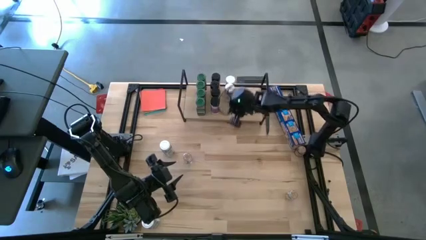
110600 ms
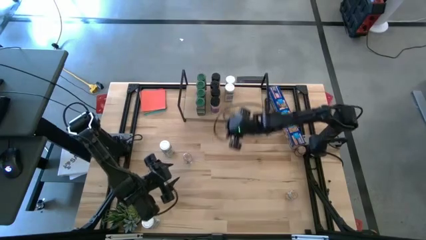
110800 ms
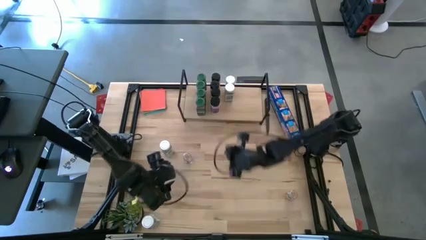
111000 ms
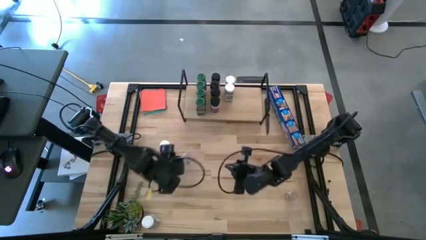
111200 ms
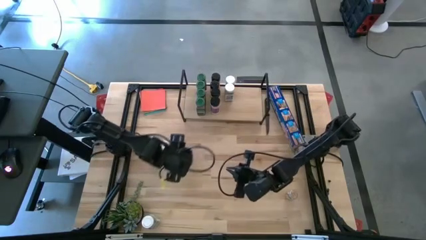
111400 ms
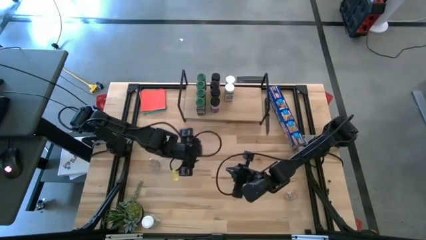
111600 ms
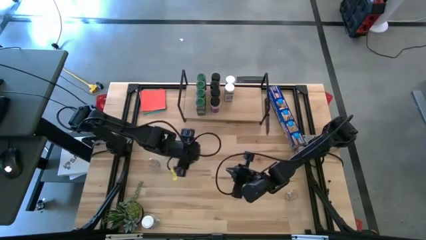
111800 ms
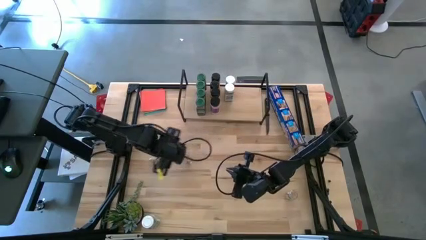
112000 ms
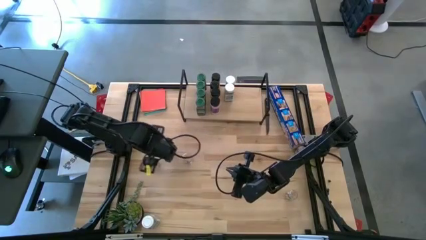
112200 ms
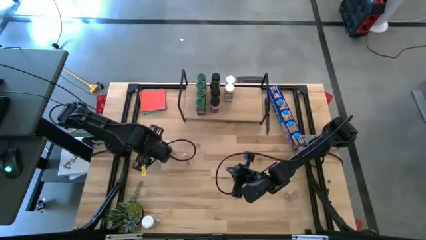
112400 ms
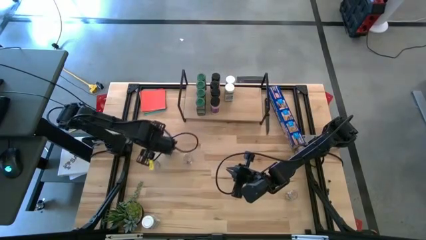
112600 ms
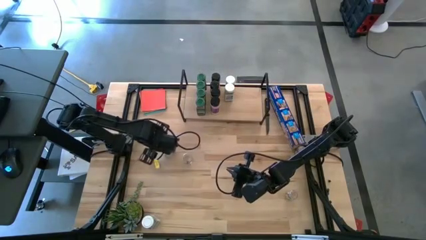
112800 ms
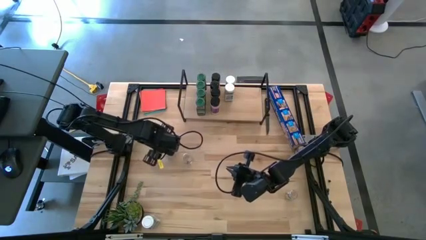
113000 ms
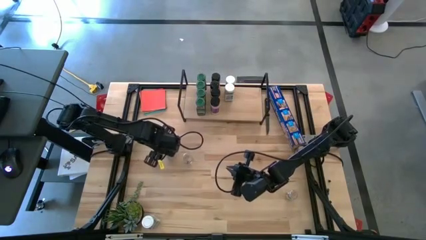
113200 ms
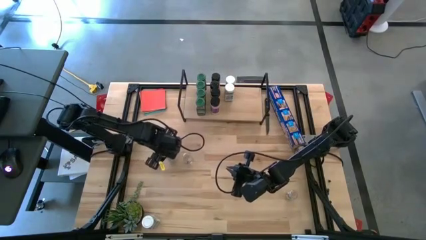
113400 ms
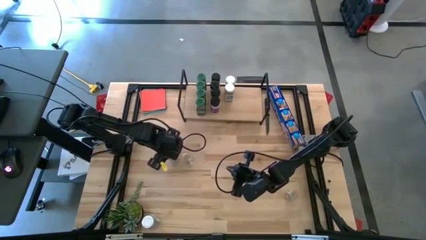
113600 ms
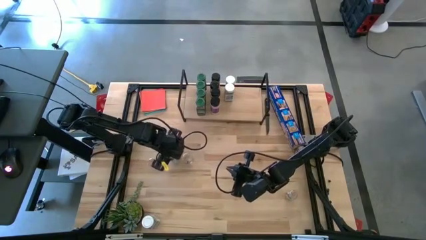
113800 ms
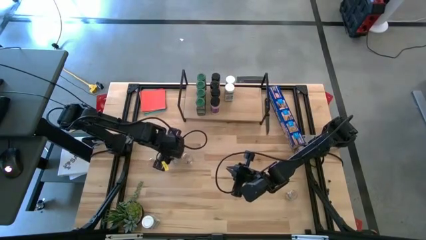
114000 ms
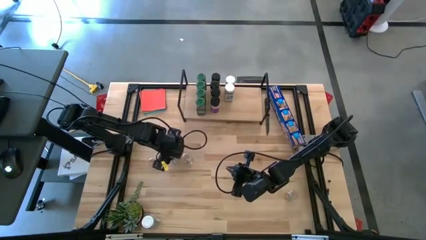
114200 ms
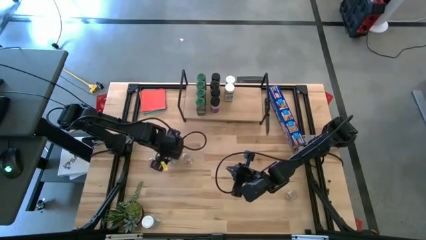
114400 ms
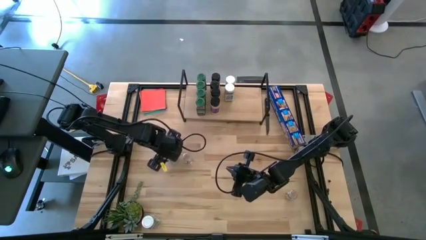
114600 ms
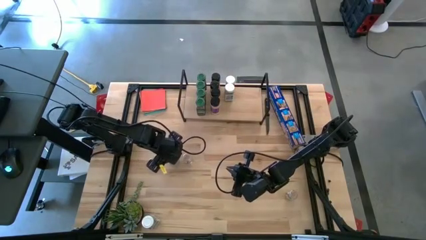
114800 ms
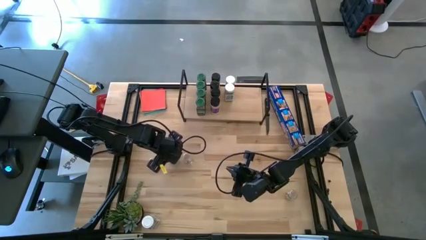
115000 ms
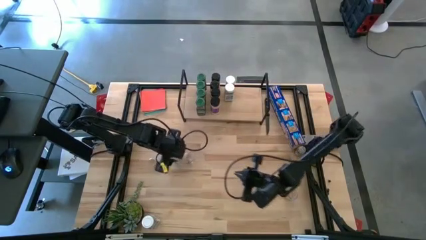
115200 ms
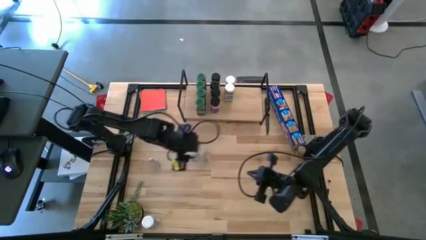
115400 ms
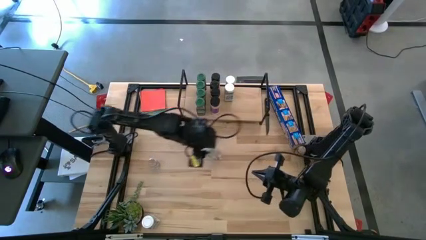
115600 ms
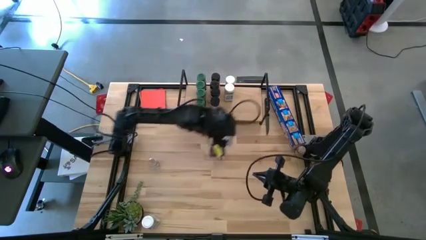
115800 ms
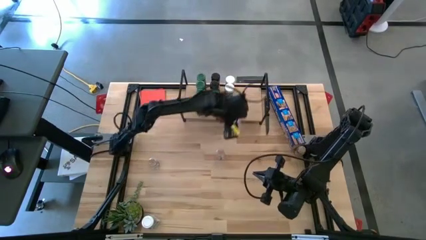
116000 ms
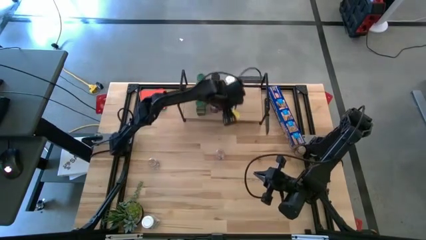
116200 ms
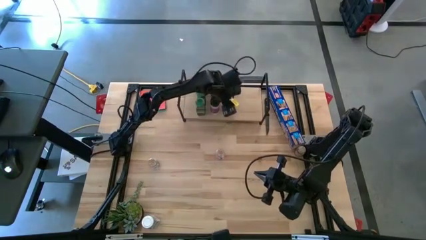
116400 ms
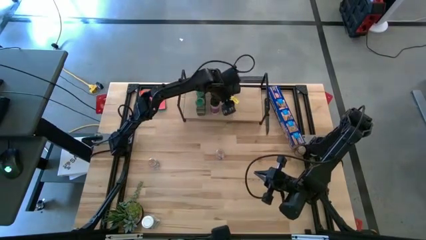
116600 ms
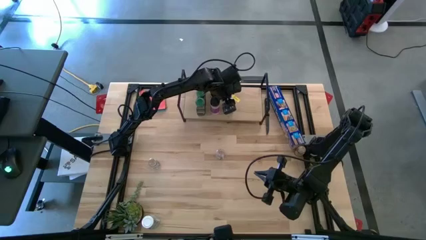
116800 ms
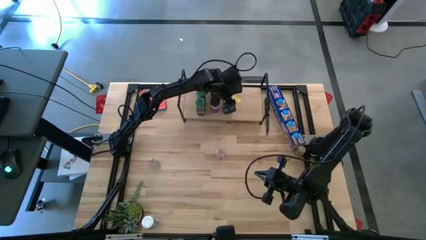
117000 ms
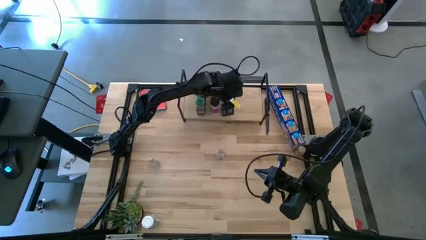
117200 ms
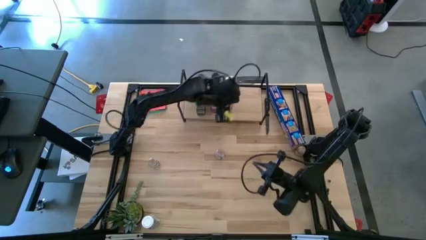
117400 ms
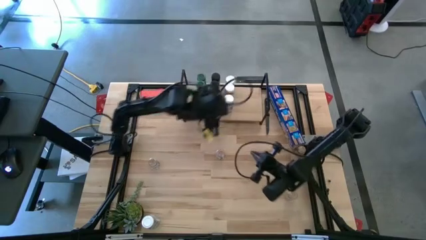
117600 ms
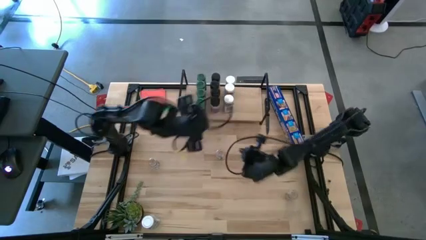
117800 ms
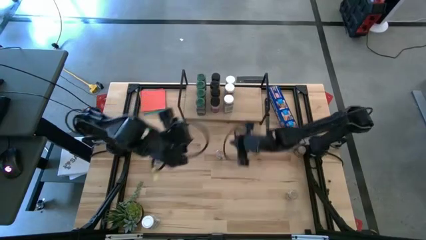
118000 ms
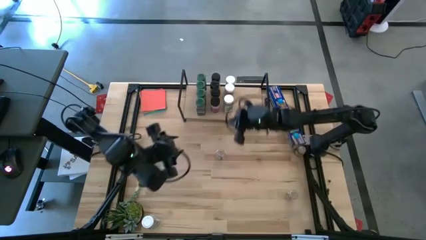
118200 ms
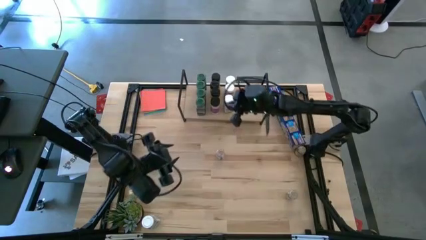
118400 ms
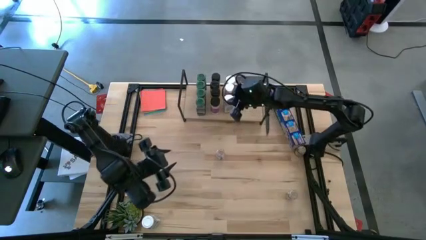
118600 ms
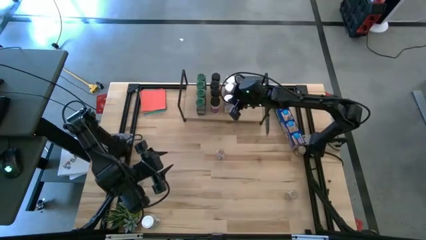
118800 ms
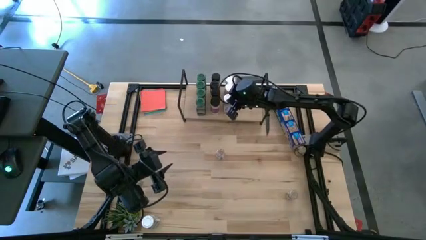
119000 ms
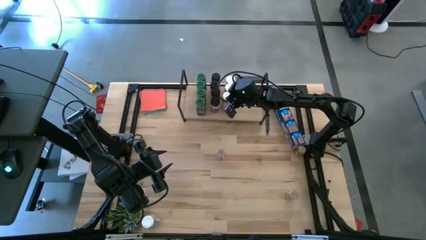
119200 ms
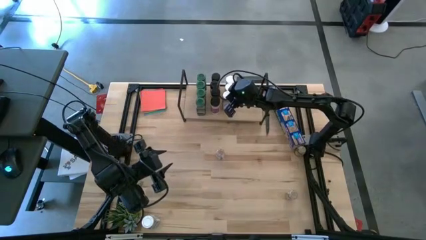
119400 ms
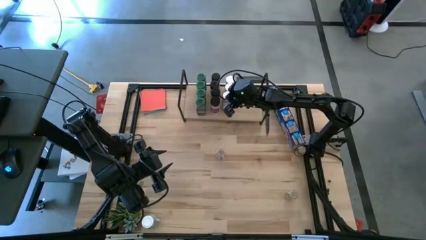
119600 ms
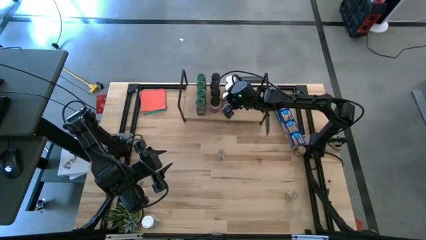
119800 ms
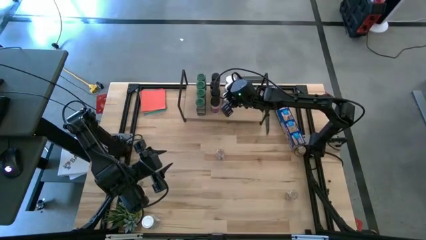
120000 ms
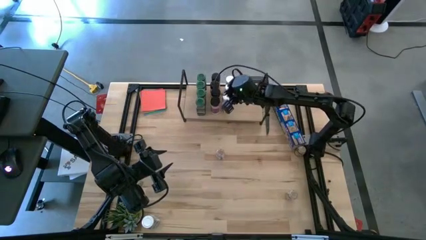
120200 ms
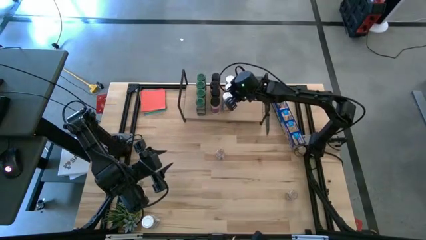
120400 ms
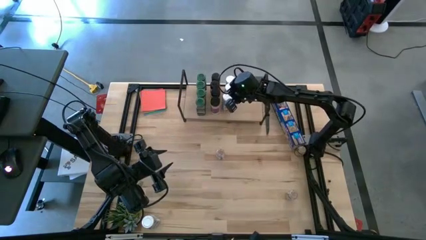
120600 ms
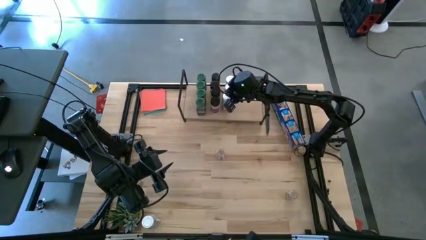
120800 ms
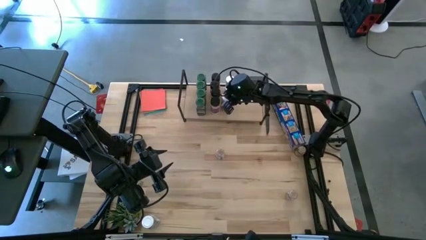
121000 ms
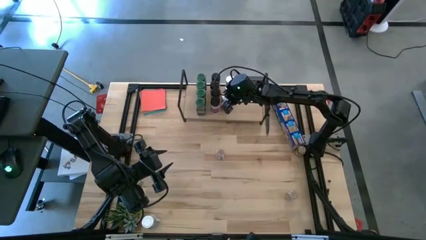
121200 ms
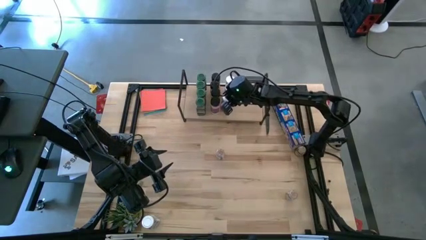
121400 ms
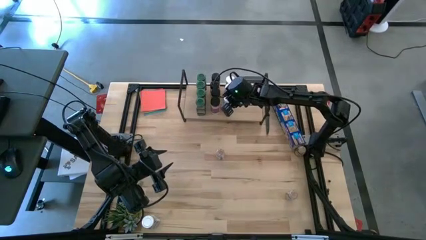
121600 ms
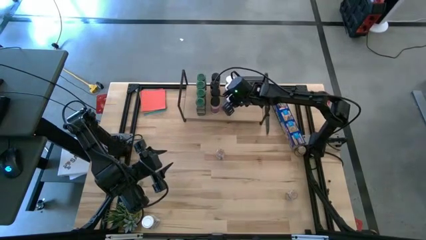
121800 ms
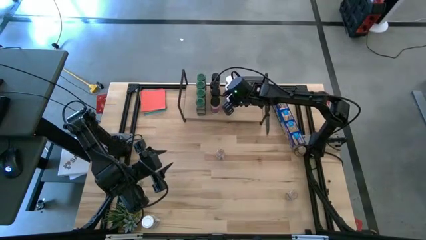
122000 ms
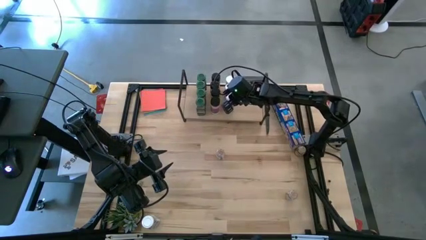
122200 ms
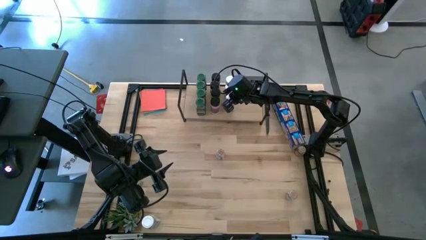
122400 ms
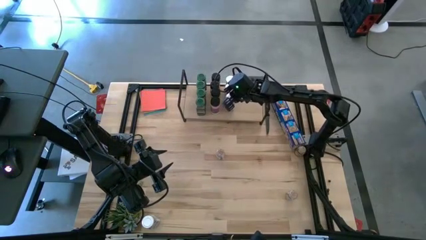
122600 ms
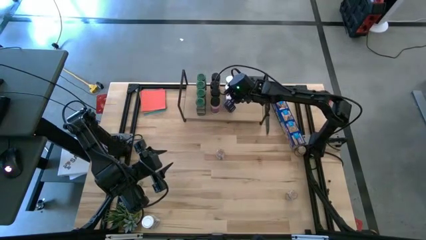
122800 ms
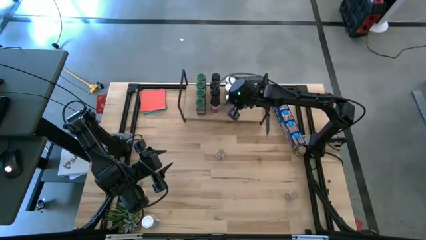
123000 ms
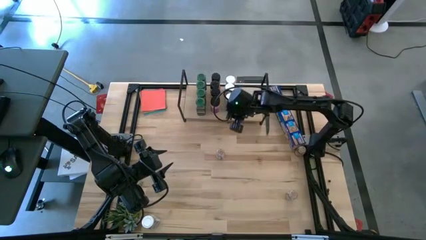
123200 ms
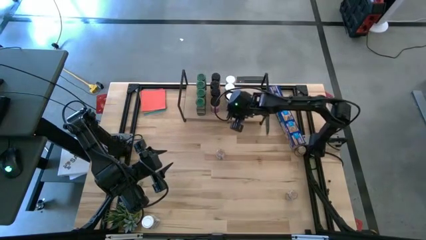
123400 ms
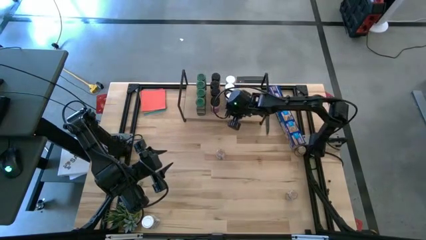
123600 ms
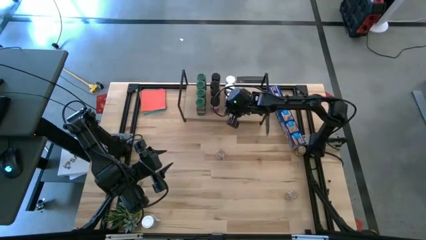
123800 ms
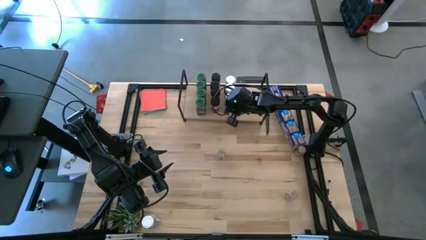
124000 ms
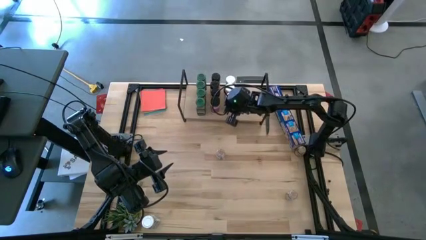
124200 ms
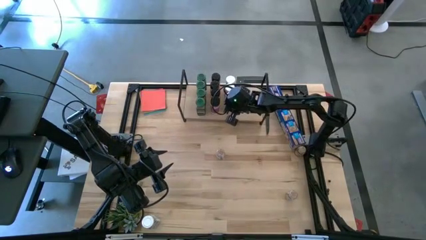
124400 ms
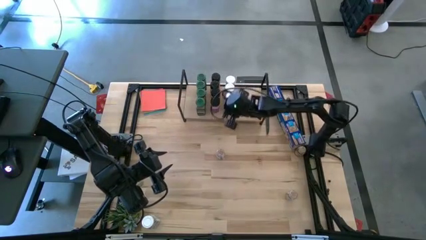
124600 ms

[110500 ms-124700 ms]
Task: Shelf spices
Put the top white seasoning bottle on the shelf aligned with the other white seasoning bottles

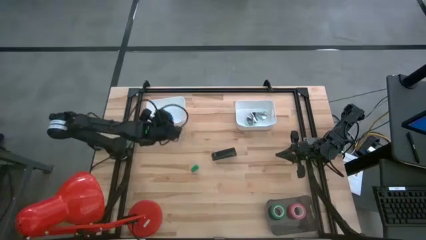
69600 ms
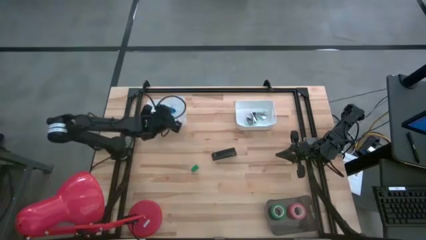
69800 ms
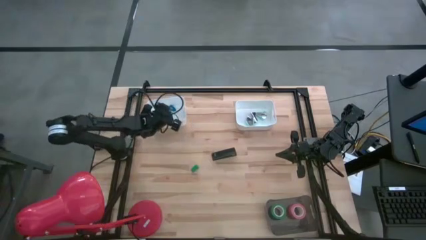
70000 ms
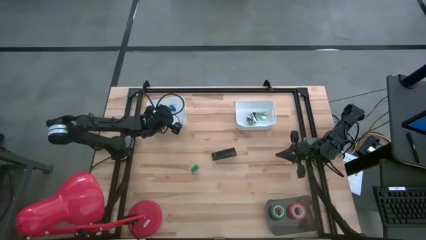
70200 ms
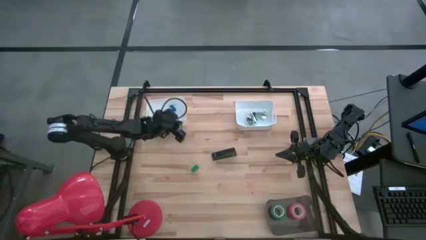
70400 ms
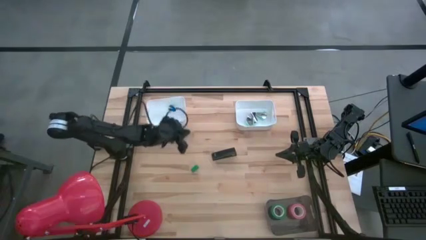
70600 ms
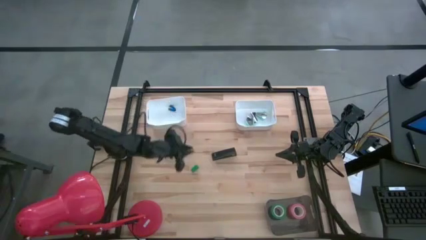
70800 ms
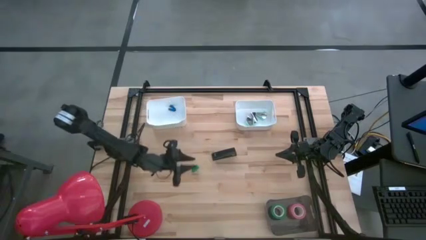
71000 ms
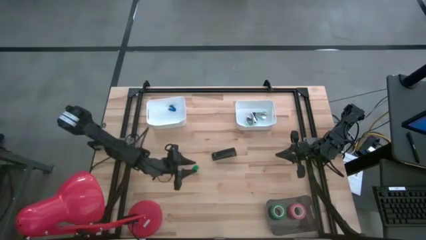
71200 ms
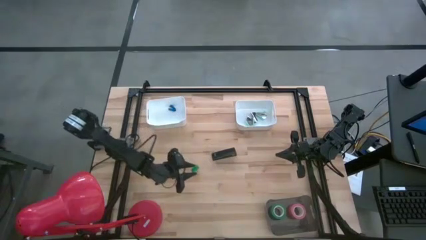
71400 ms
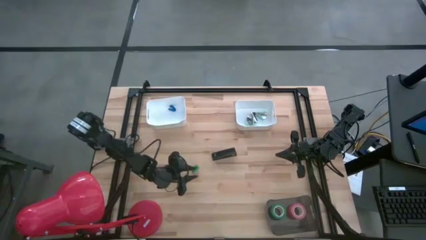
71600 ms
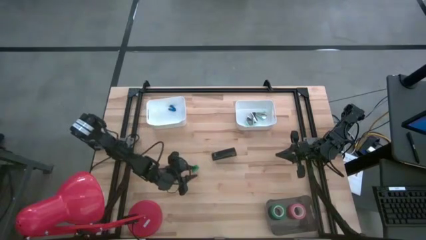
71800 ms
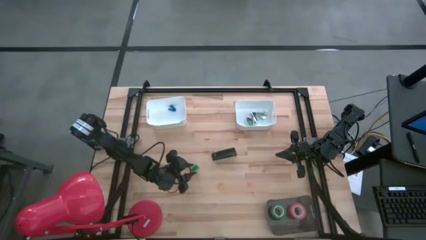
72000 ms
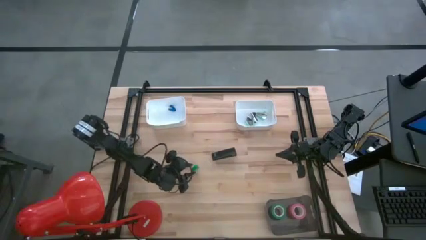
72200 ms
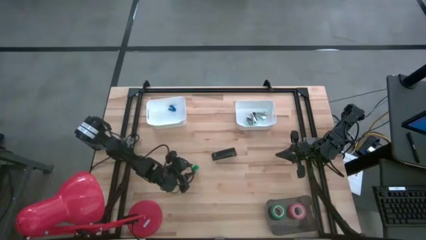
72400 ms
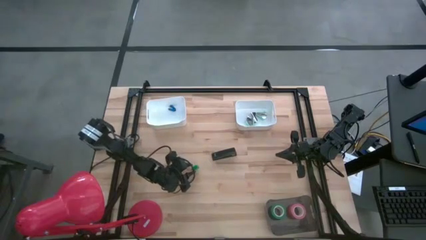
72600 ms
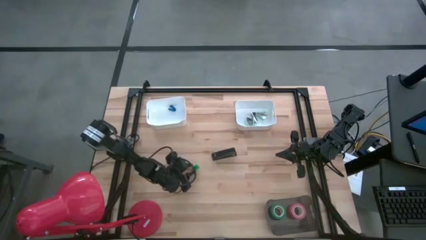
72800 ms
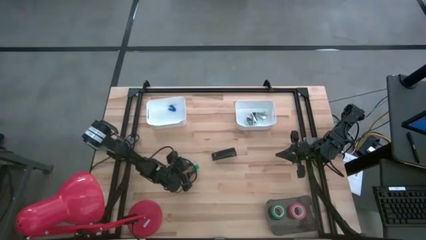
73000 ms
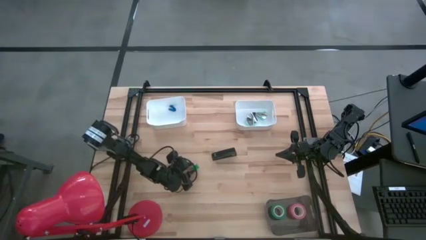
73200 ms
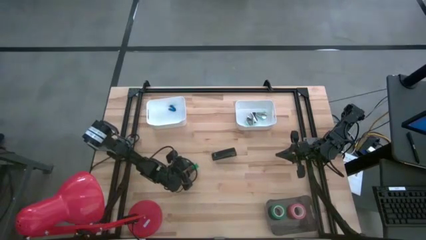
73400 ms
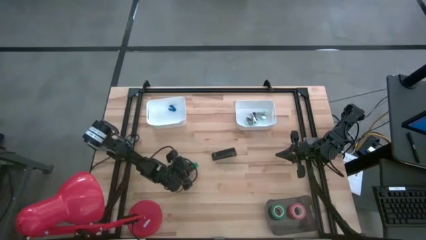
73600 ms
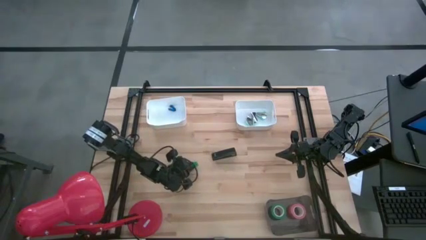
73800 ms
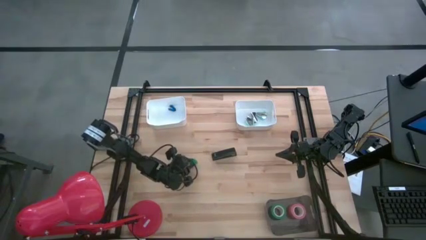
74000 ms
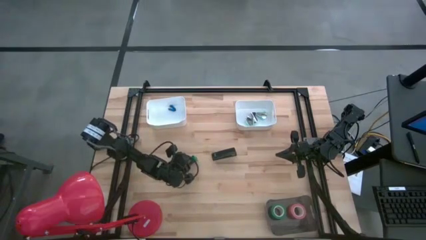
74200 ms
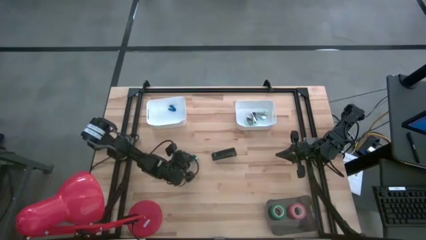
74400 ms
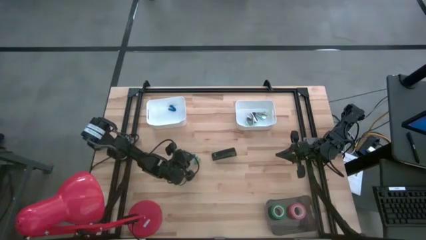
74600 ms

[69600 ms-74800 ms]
Task: Pick and place Stapler, Stapler remover, tape
Put the green stapler into the left white bin
